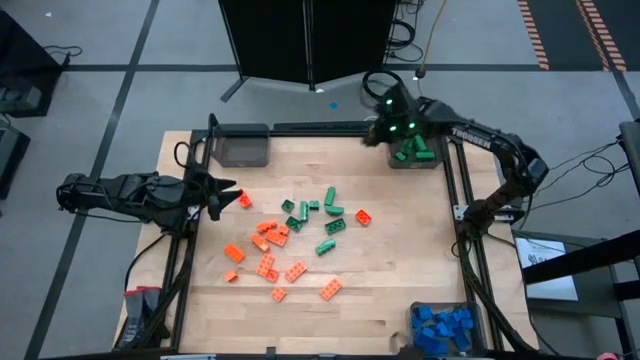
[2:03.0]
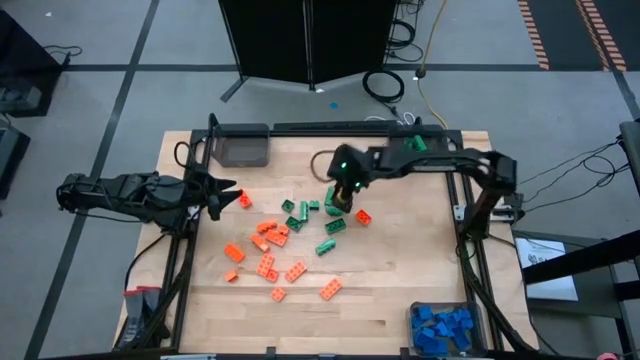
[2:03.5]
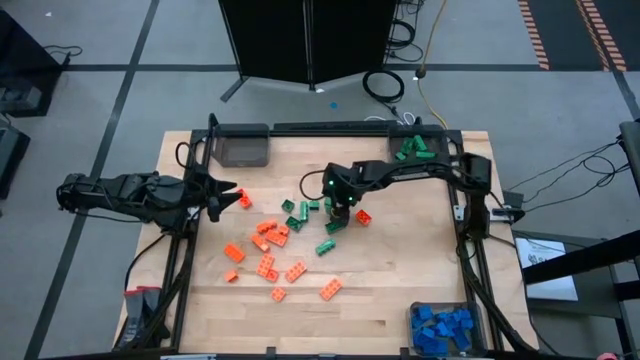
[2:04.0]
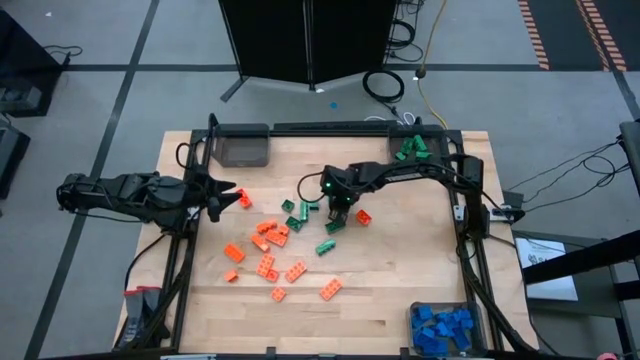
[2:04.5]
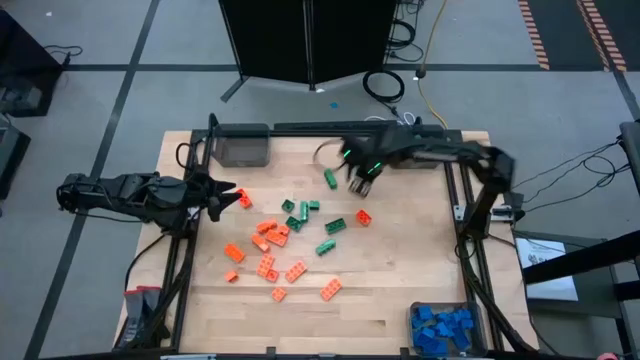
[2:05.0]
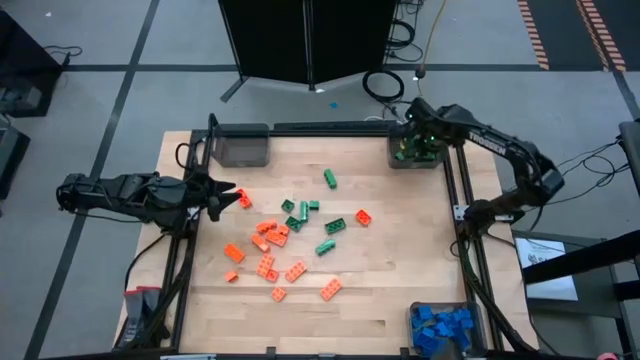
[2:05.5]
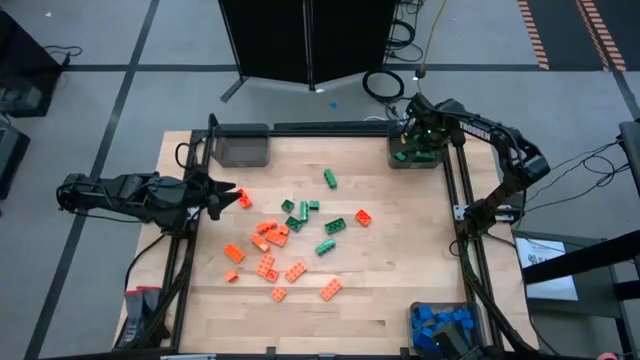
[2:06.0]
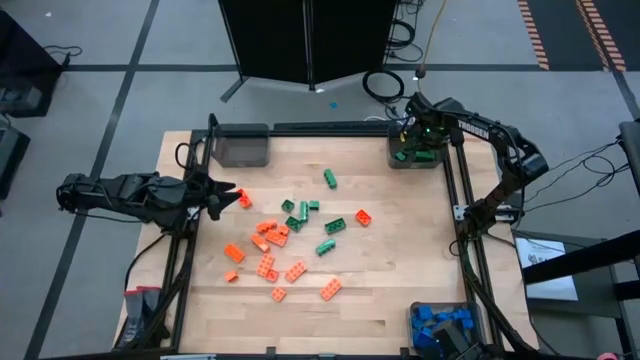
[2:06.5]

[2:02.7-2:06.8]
Task: Sort blocks
Put the green game piece into the top right black bin

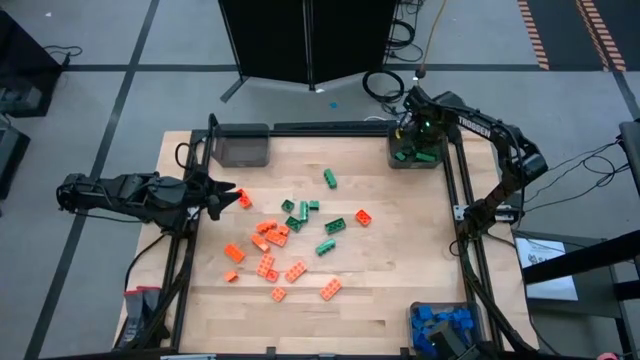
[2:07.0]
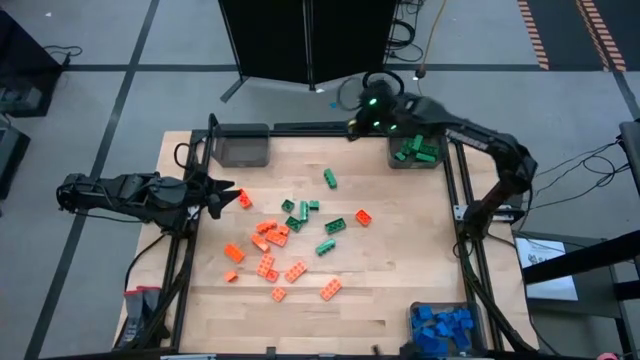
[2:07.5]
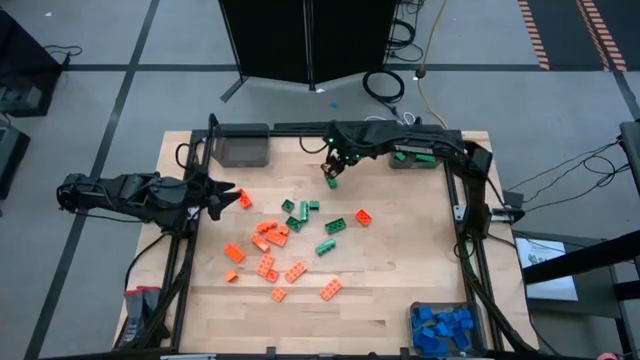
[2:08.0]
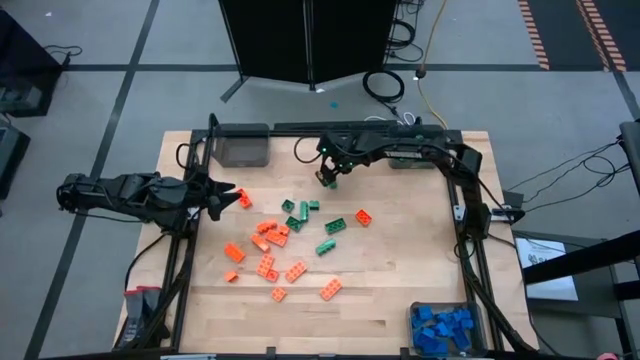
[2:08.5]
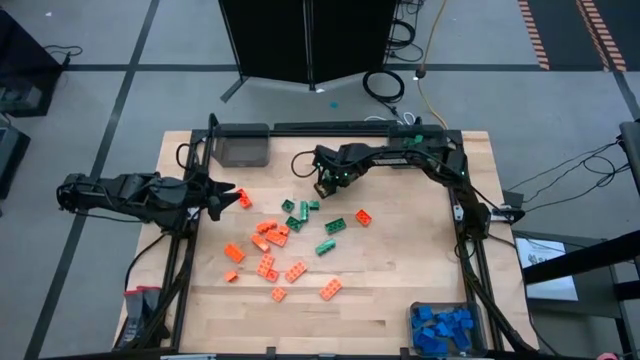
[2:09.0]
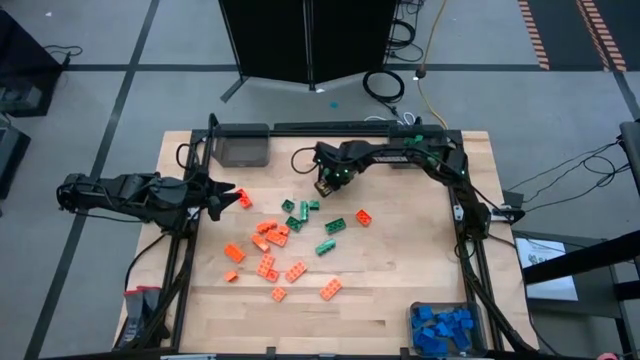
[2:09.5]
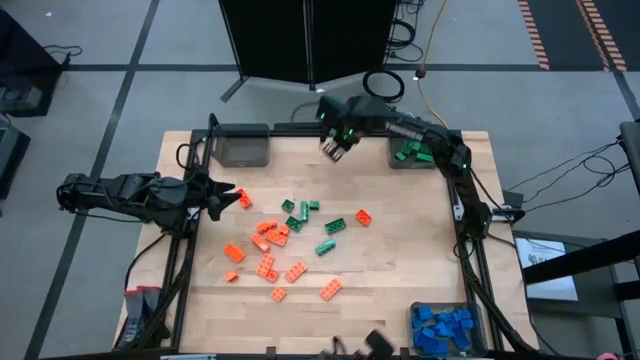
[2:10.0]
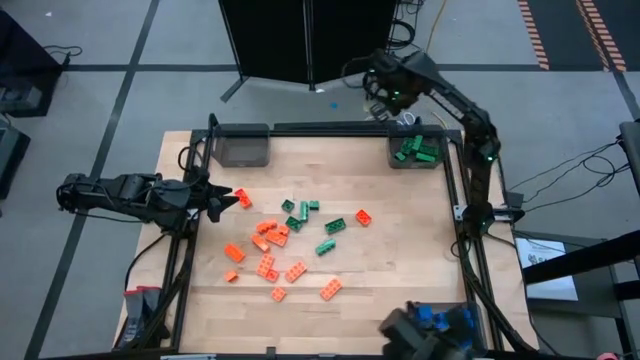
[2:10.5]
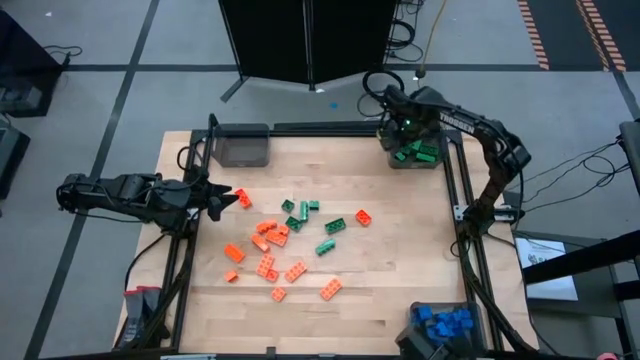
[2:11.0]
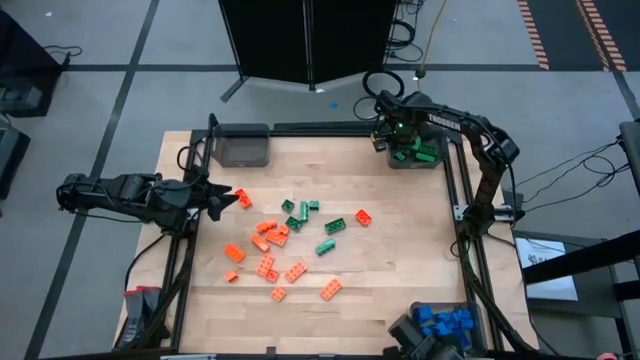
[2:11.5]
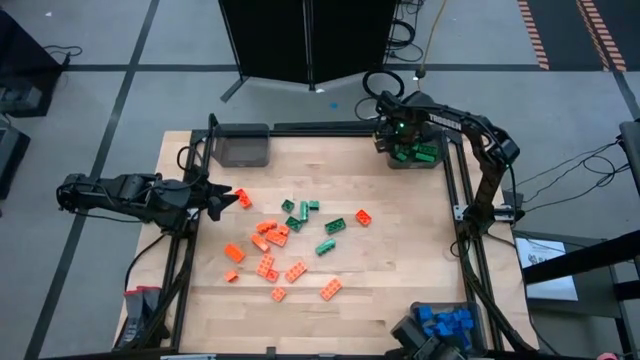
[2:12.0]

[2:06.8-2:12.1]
Put the green game piece into the top right black bin

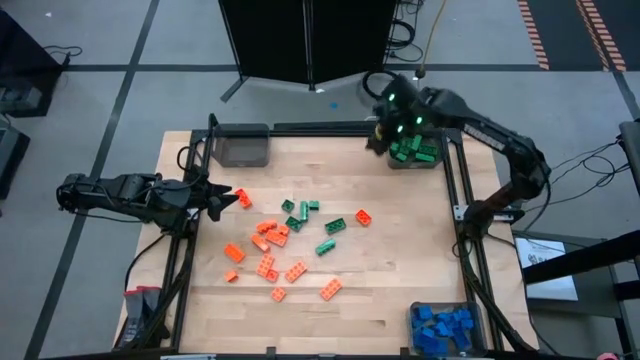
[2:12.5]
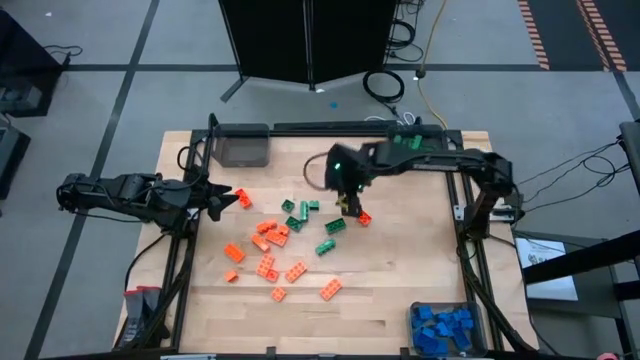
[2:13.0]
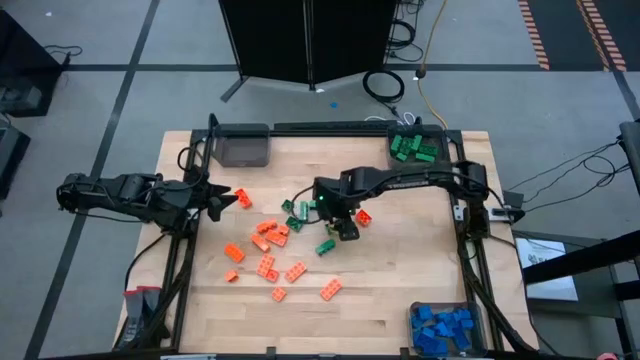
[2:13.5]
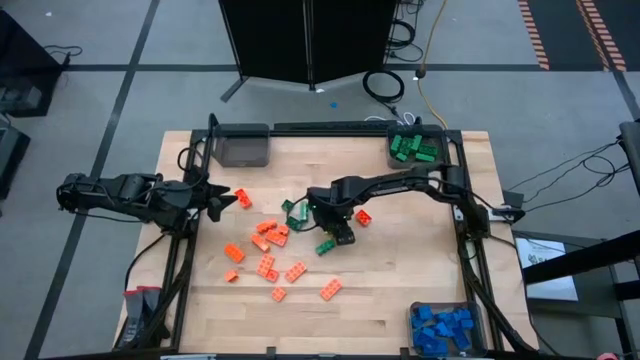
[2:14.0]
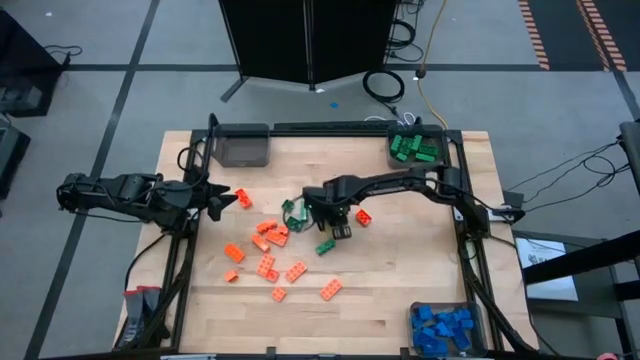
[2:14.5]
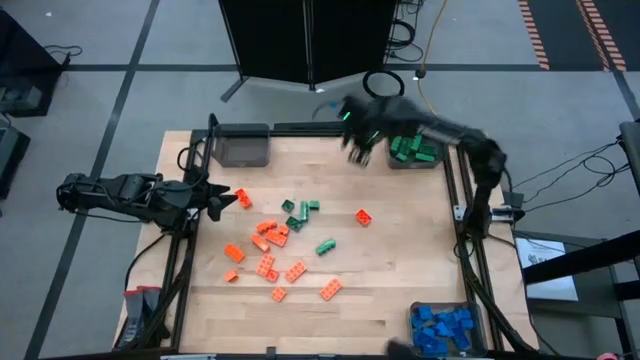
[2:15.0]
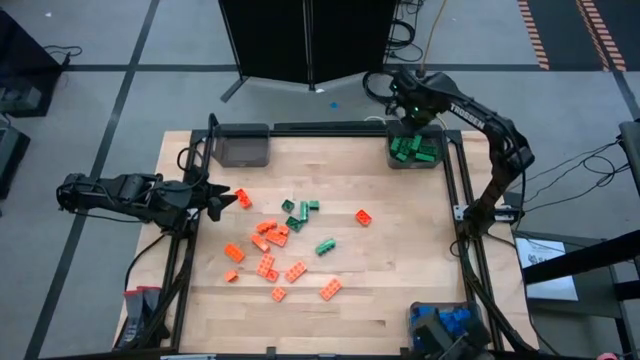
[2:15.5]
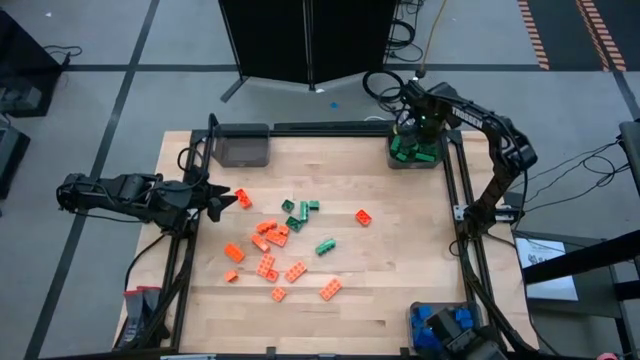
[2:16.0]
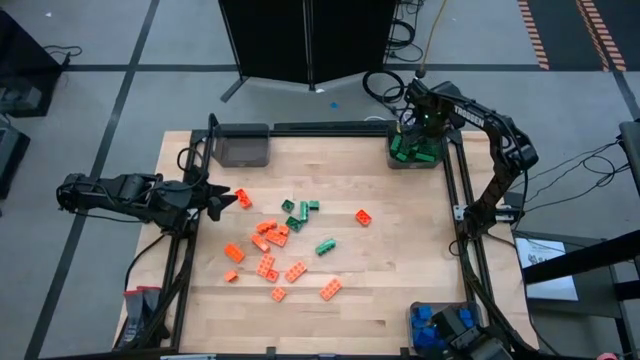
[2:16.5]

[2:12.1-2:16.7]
Put the green game piece into the top right black bin

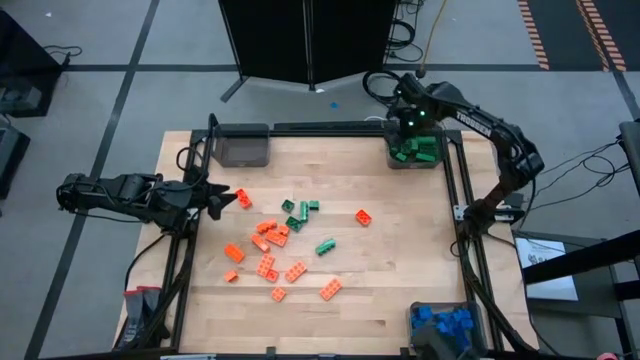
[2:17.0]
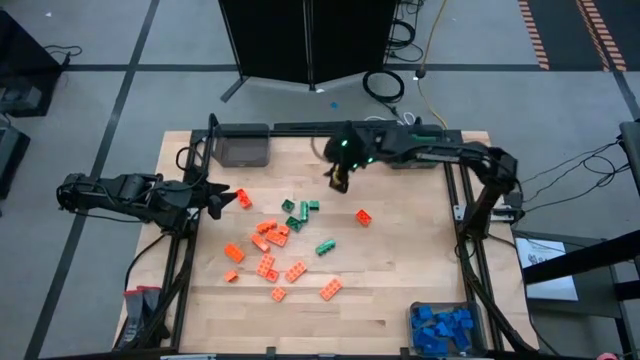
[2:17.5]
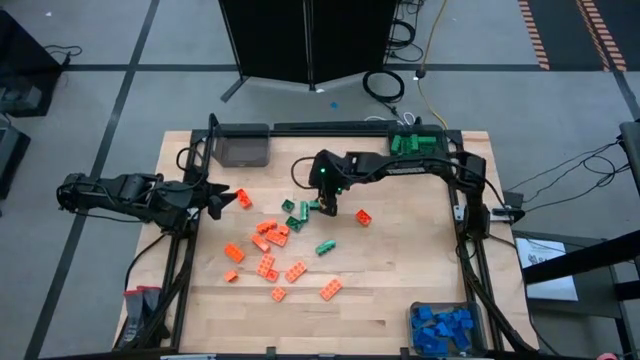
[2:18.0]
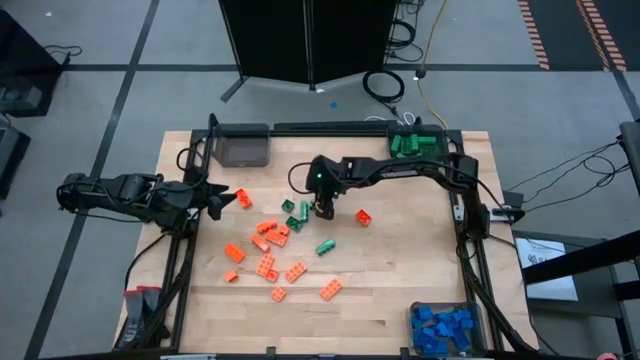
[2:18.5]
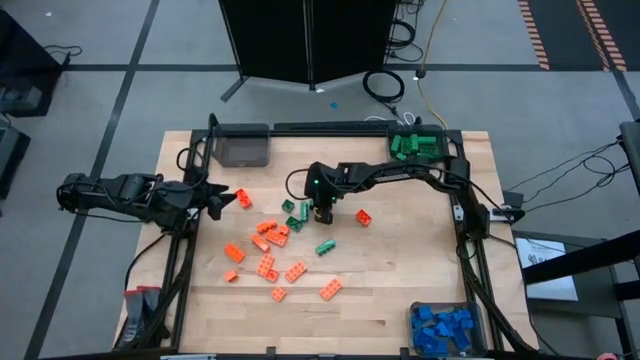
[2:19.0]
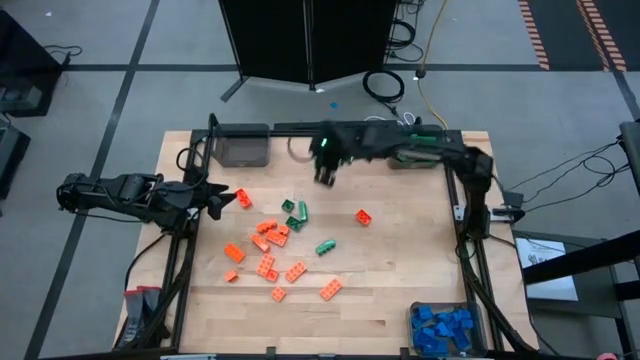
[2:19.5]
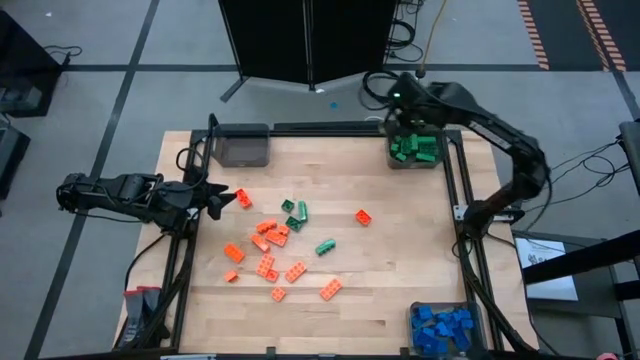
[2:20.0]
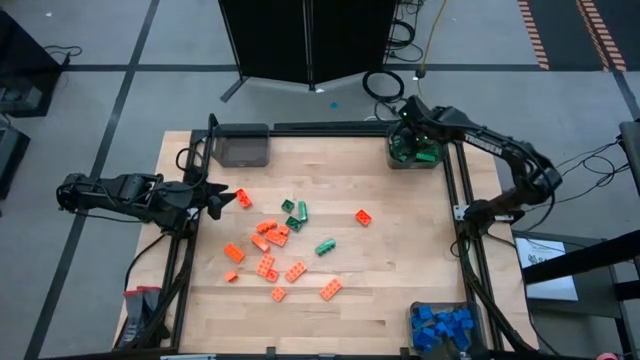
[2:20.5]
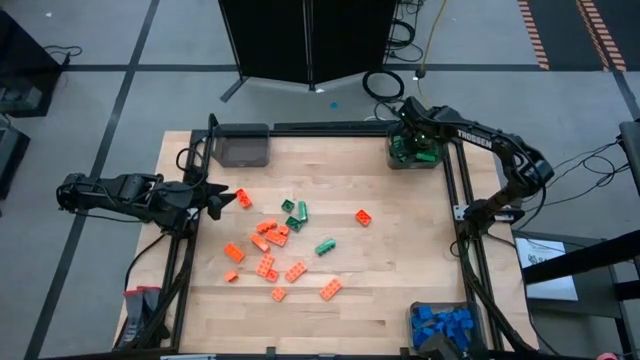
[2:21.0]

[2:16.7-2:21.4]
Put the green game piece into the top right black bin

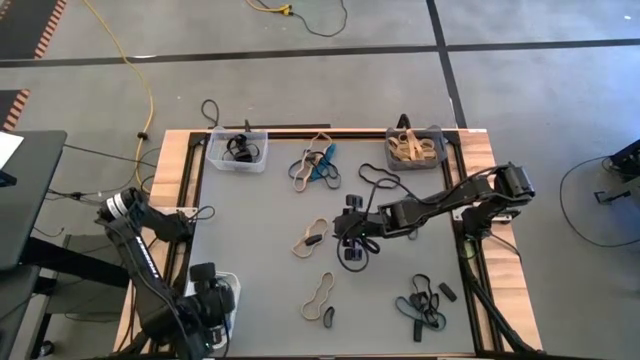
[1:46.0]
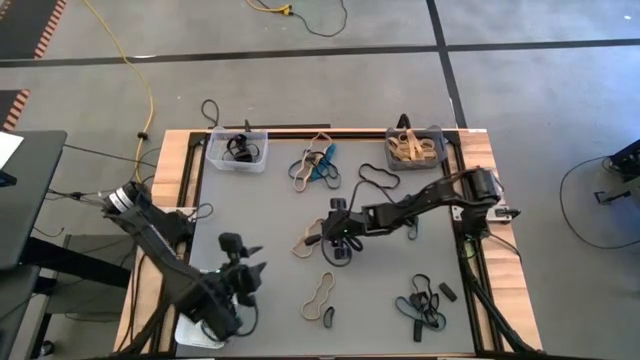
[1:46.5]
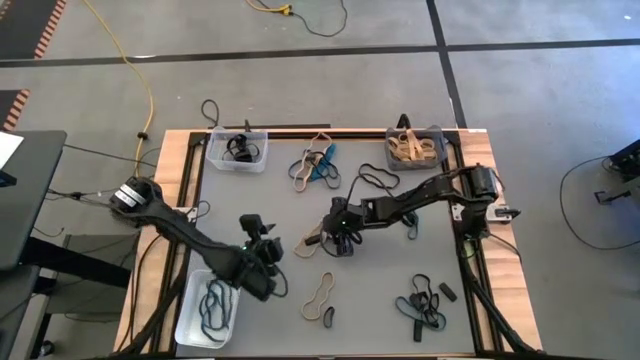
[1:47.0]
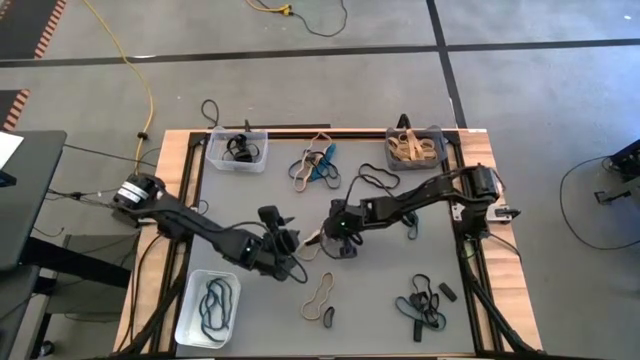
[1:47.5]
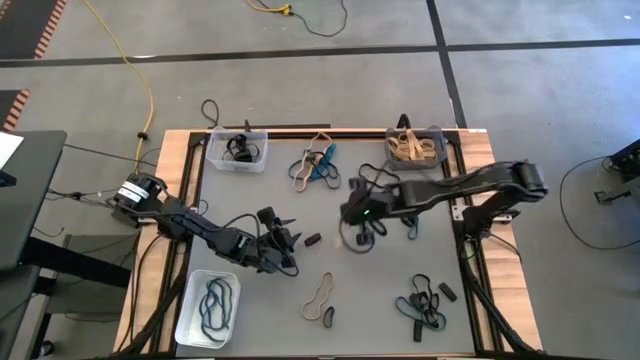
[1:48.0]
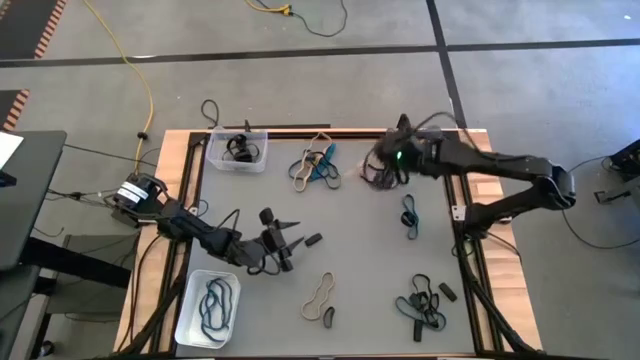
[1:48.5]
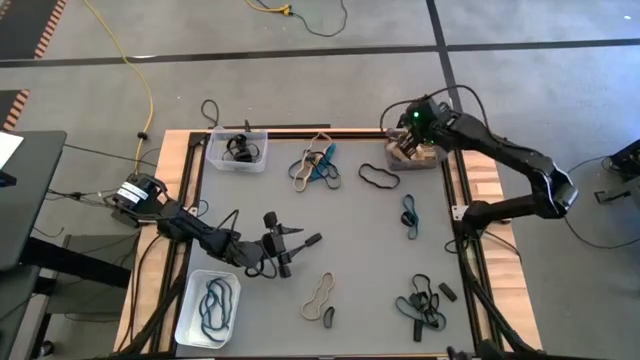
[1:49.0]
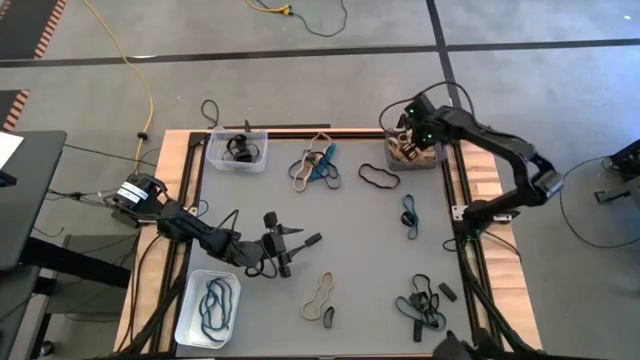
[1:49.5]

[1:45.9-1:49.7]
Task: Sort rubber bands into baskets
Put the white rubber band into the black transparent bin
